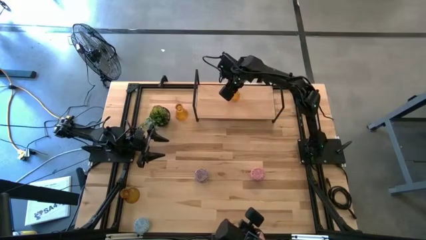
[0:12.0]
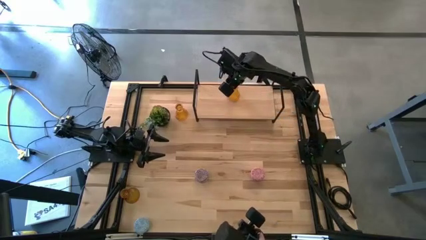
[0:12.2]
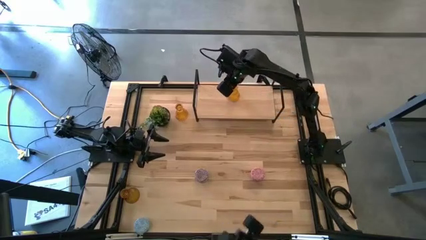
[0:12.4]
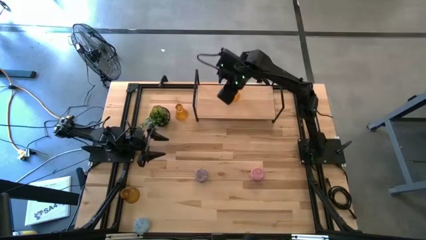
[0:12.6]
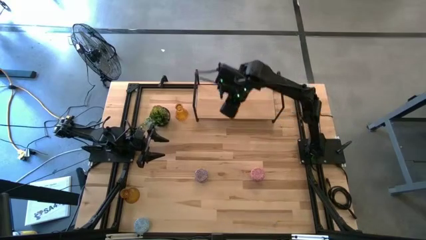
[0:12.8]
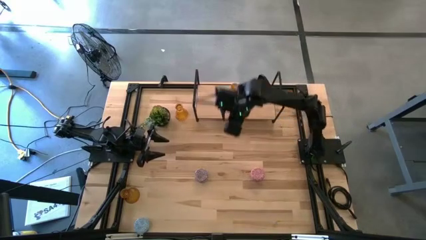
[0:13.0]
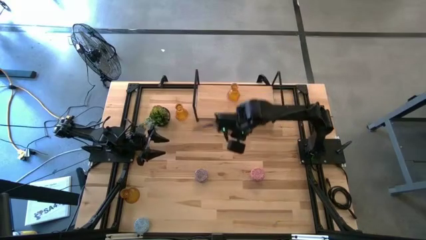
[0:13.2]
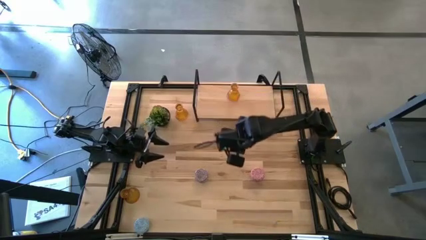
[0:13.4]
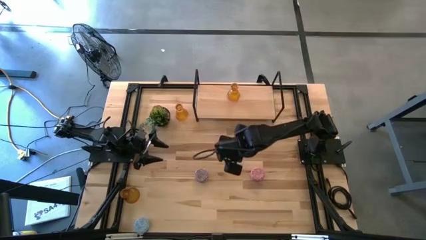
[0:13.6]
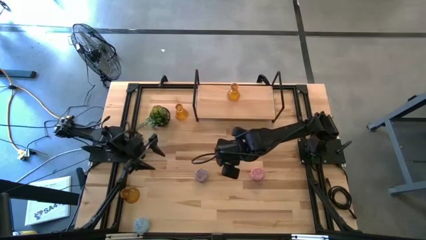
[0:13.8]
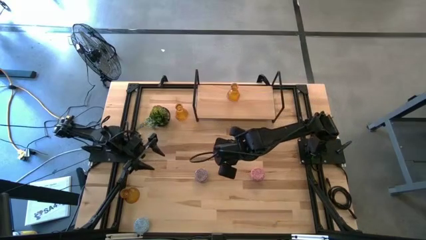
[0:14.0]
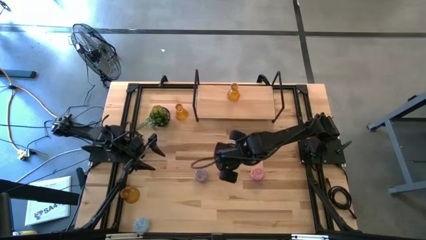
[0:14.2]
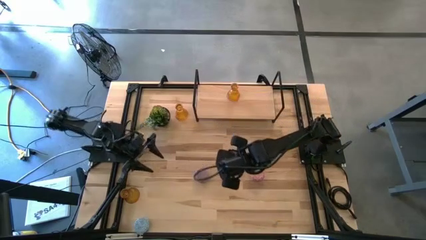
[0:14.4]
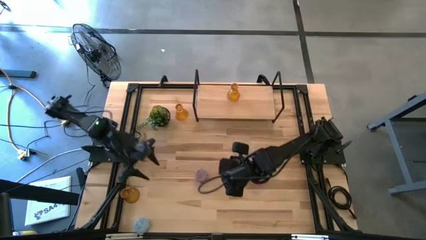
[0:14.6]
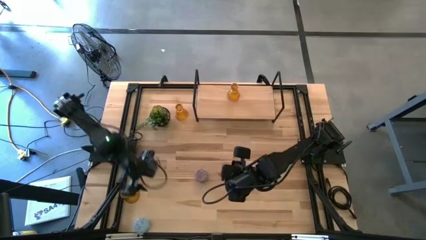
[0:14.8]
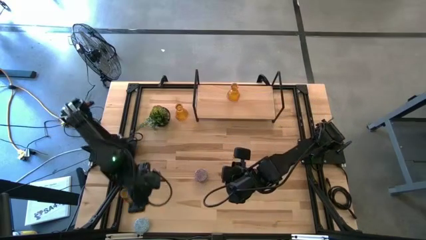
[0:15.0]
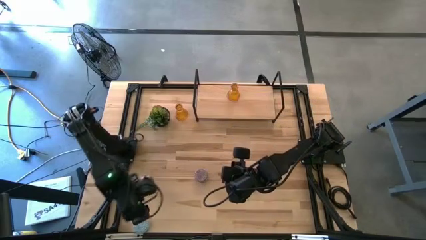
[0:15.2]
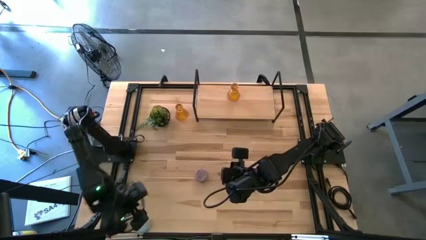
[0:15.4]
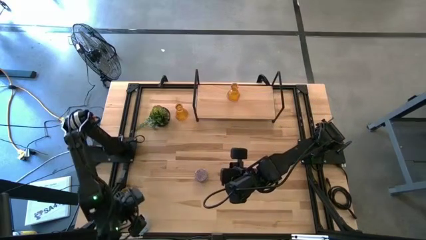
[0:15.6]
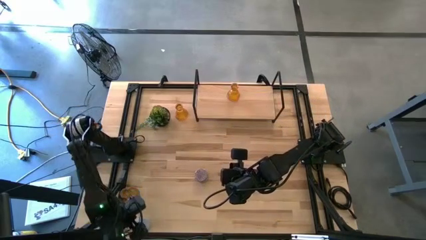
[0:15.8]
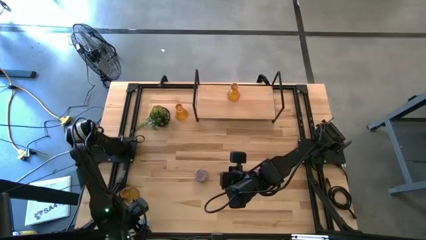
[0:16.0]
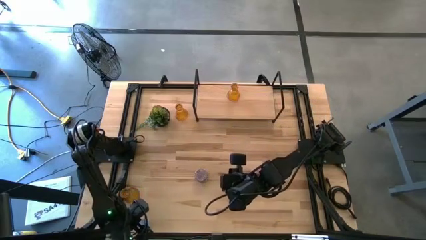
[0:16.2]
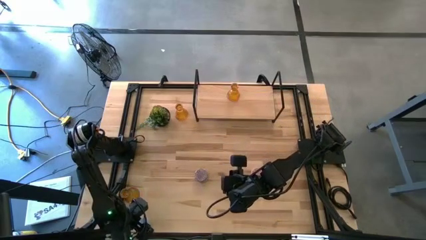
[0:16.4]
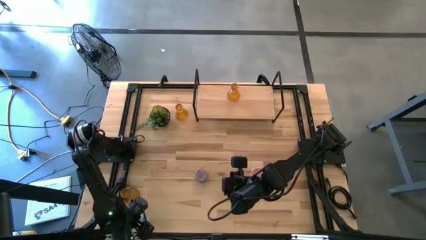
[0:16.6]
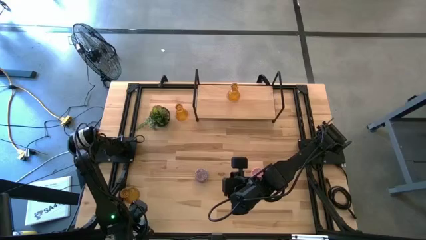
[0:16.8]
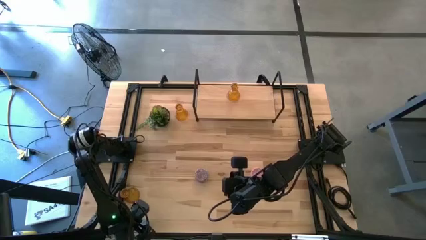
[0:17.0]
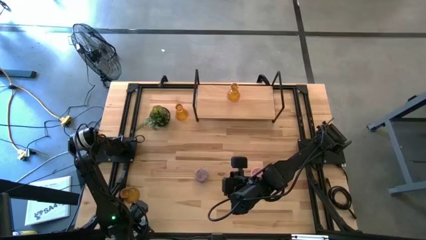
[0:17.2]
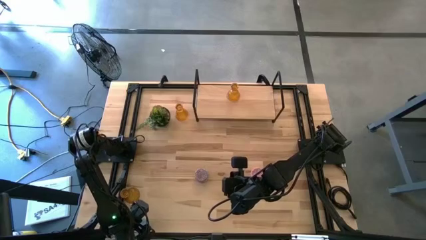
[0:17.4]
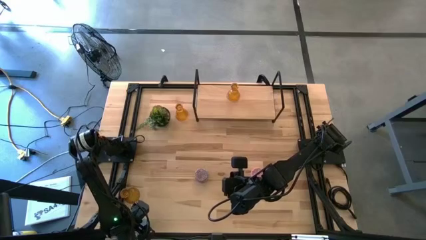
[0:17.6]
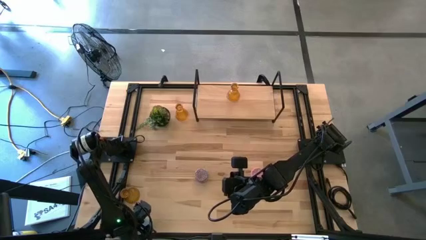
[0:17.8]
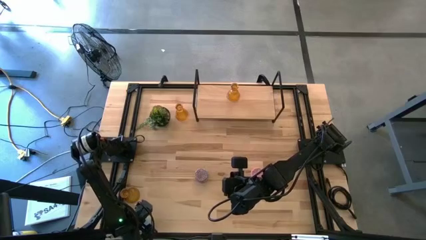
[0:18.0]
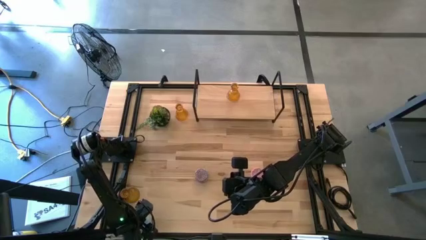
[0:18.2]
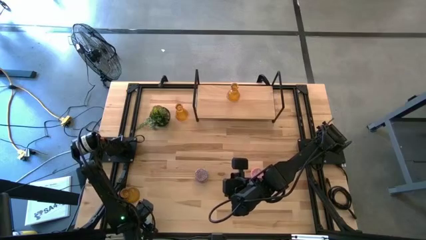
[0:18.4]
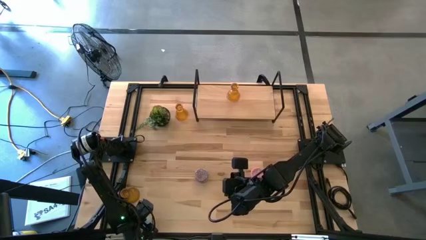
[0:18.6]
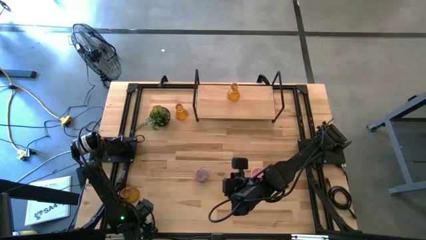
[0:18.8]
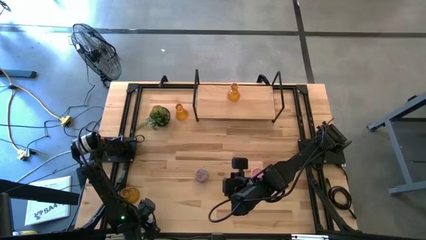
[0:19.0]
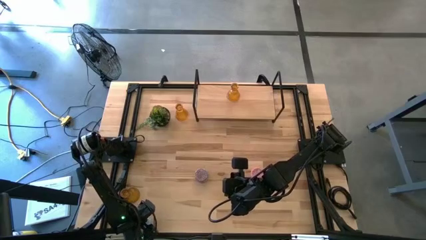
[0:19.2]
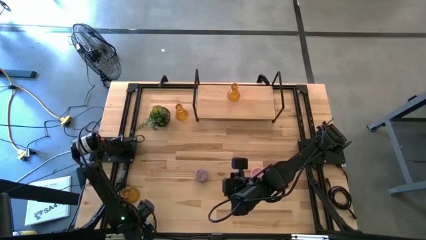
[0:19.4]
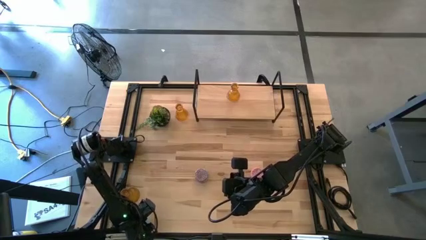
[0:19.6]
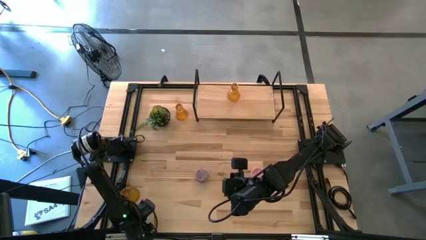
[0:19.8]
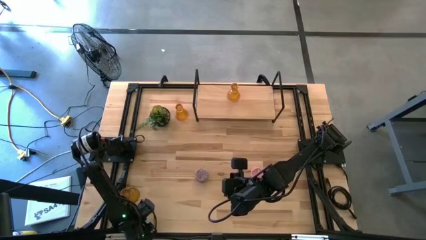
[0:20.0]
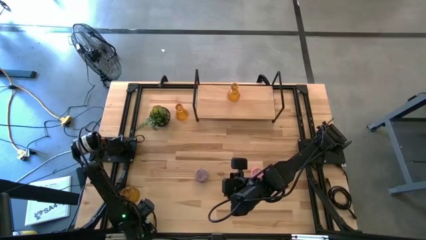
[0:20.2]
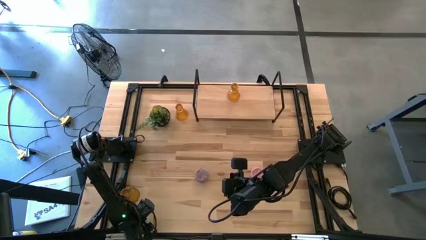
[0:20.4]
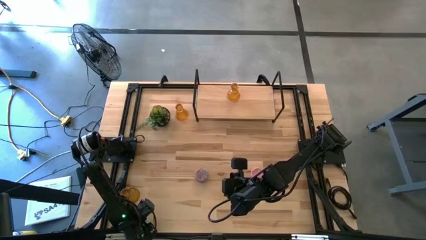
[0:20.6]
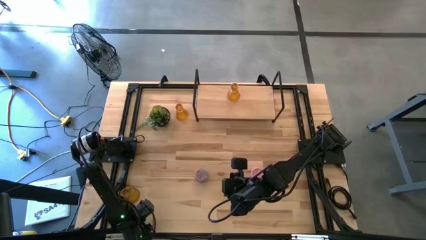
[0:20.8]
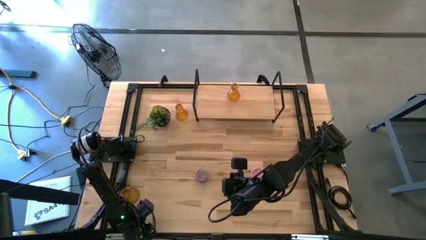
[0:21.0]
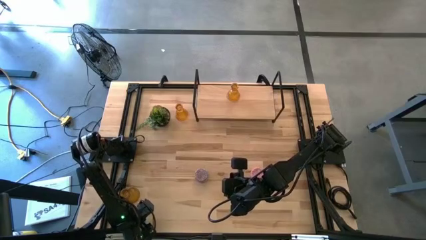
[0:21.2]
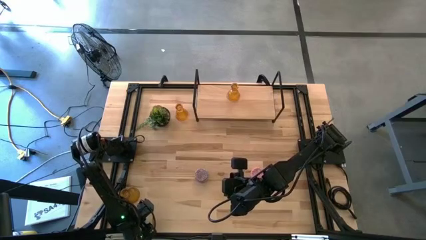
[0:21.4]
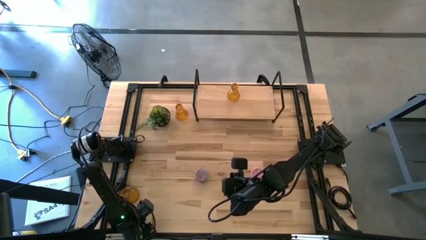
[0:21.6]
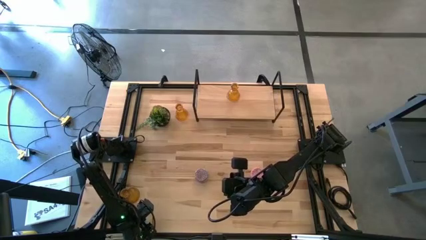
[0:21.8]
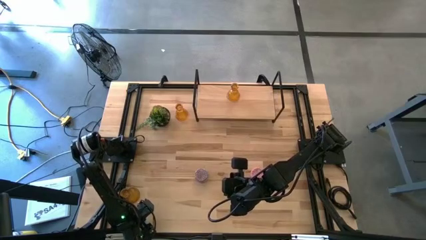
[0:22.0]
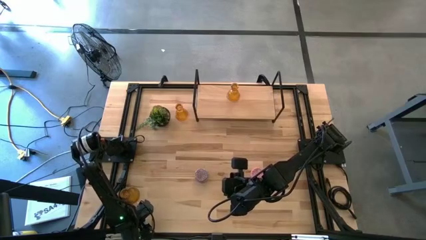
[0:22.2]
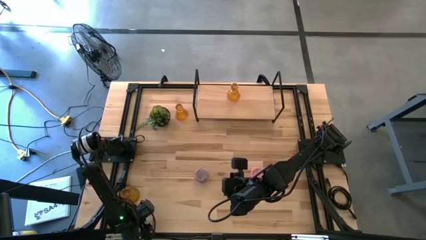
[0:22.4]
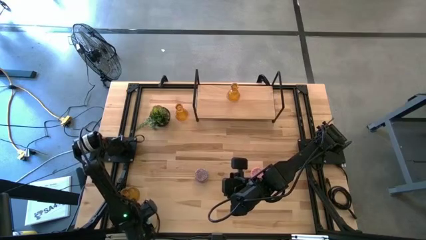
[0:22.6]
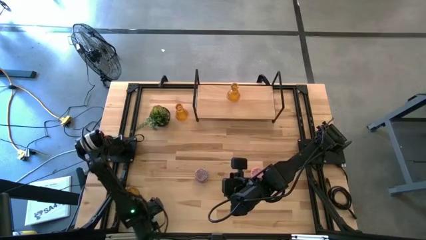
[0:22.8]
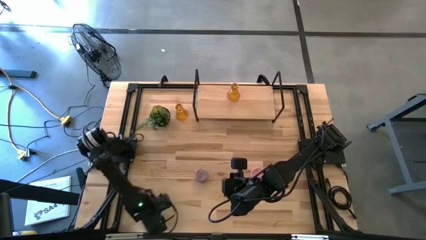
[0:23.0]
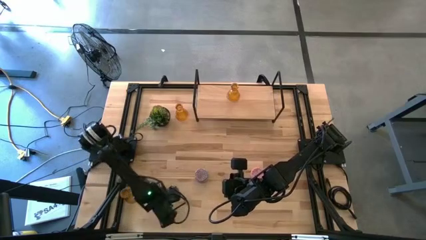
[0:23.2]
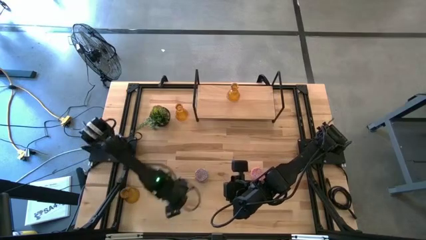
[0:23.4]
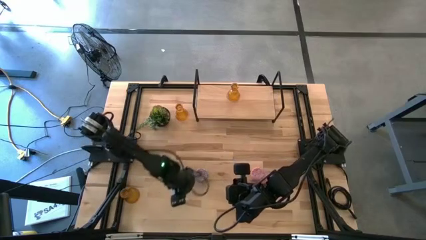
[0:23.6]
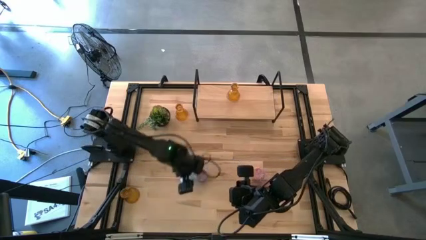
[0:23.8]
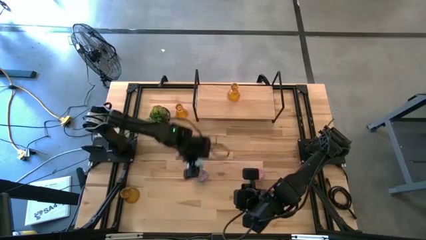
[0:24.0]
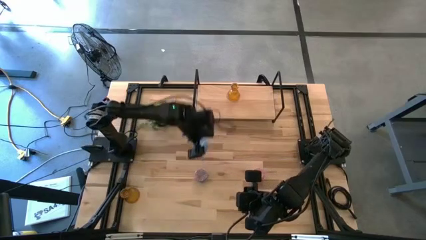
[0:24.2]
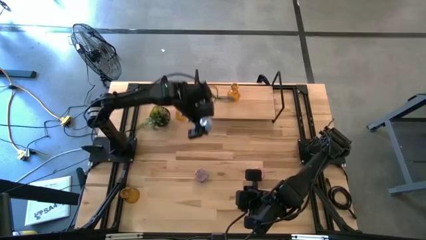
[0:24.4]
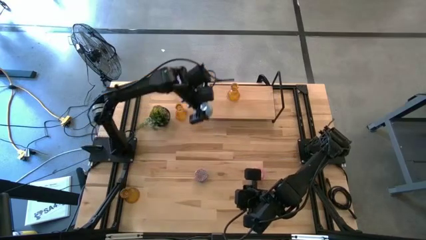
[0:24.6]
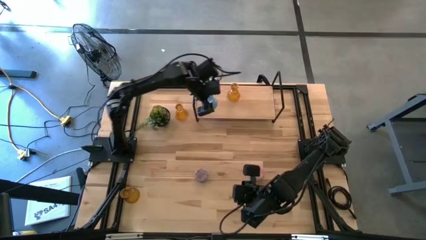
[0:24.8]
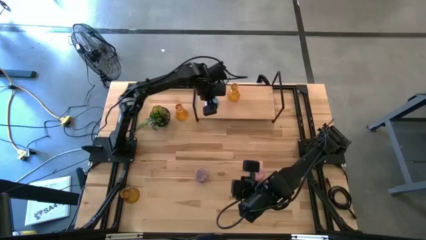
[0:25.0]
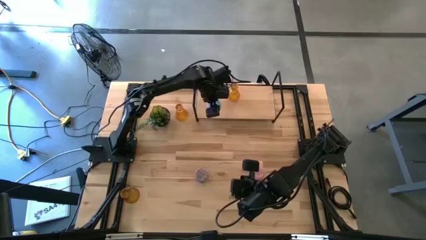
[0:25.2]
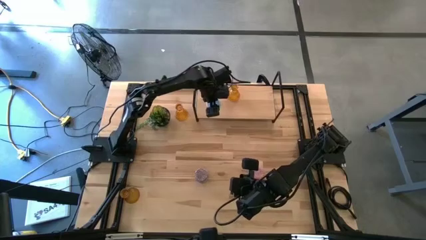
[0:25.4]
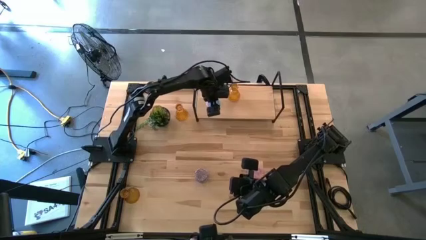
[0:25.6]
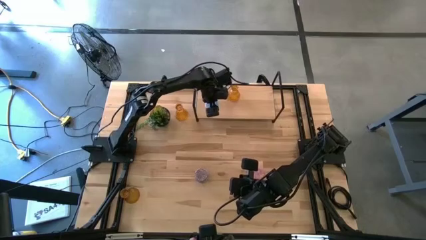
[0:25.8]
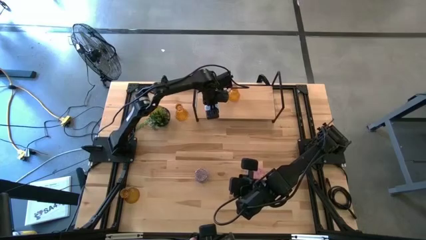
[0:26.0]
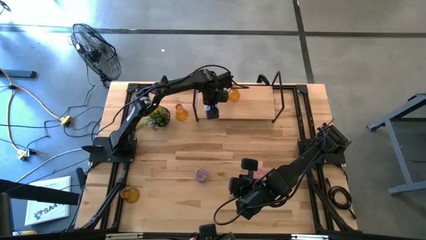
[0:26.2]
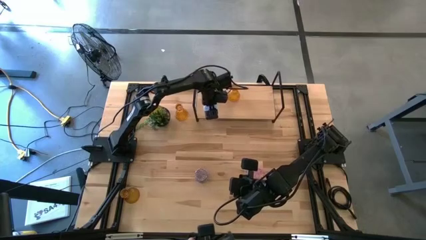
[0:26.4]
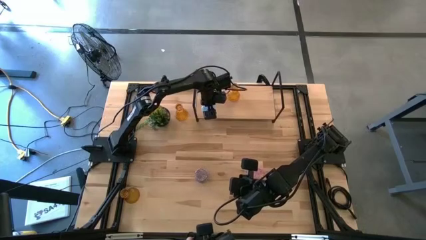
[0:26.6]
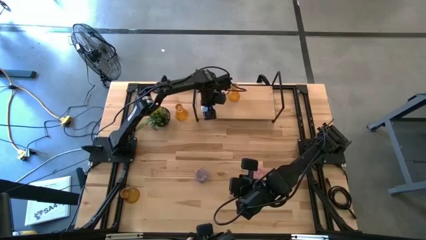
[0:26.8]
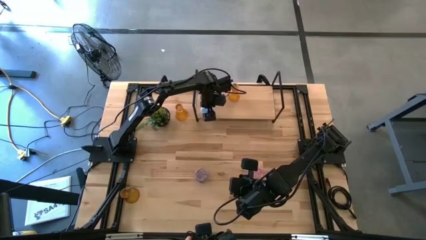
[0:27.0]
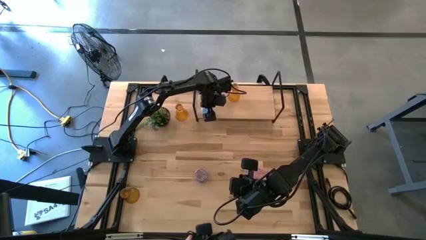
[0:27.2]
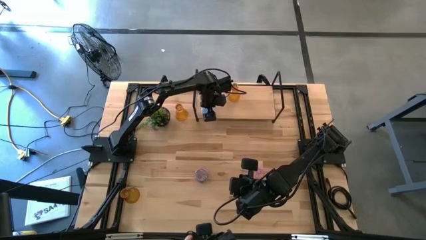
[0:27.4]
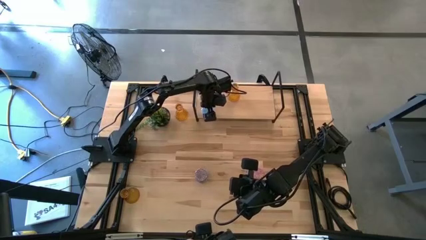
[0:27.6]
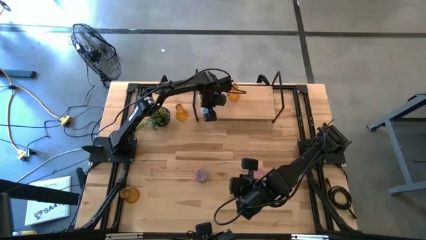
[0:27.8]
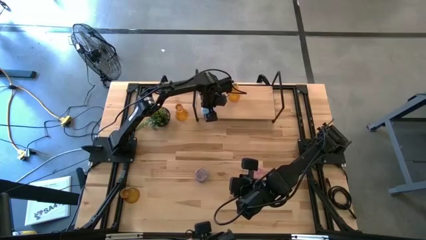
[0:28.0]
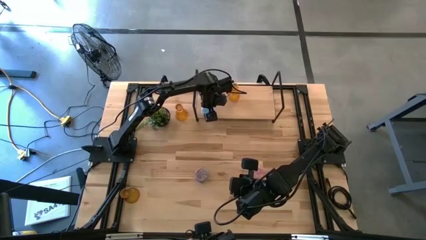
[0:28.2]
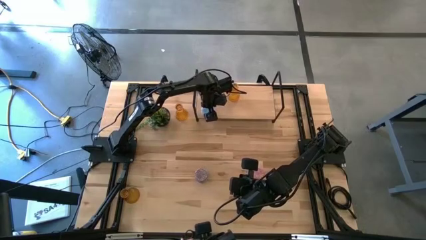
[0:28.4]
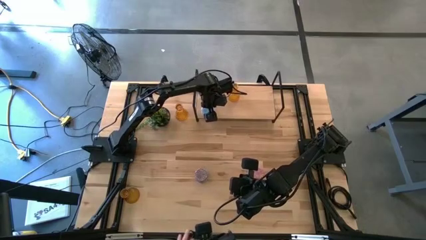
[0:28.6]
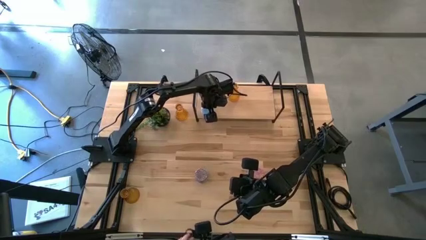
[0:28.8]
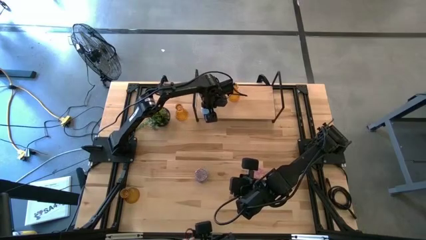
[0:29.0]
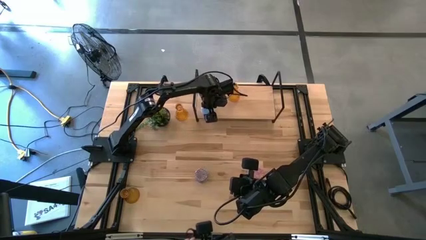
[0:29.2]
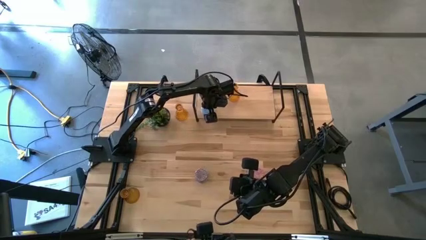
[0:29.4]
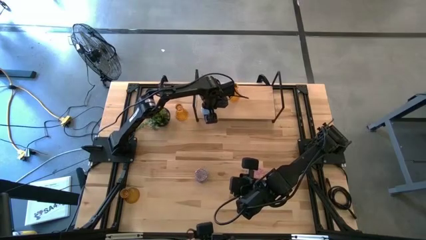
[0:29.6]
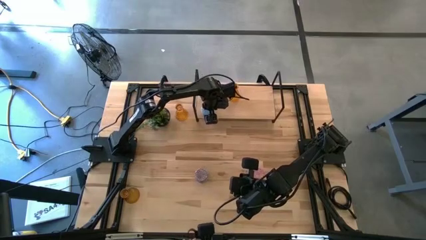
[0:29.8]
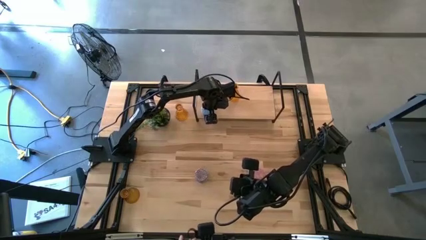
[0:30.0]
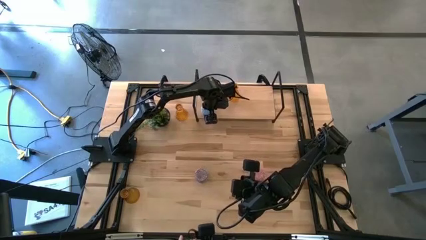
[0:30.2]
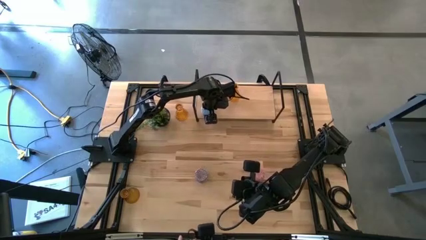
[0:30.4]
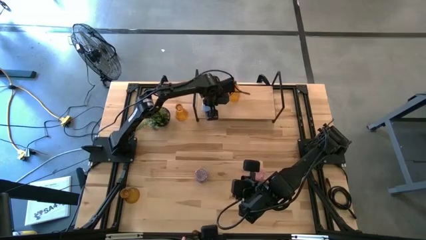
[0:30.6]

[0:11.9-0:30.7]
Task: Pick & Place candle stick holders
Put the blue scented candle on the shelf
